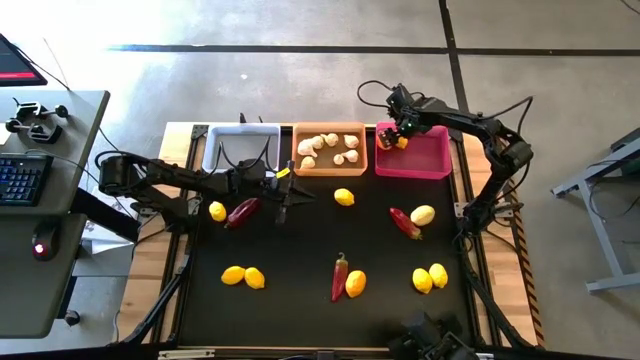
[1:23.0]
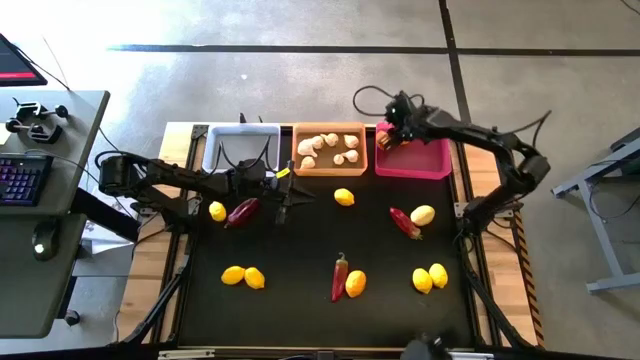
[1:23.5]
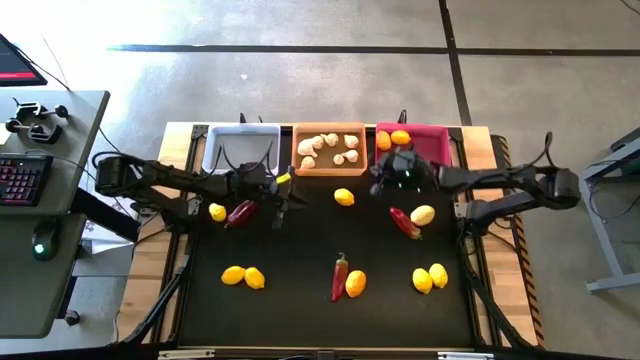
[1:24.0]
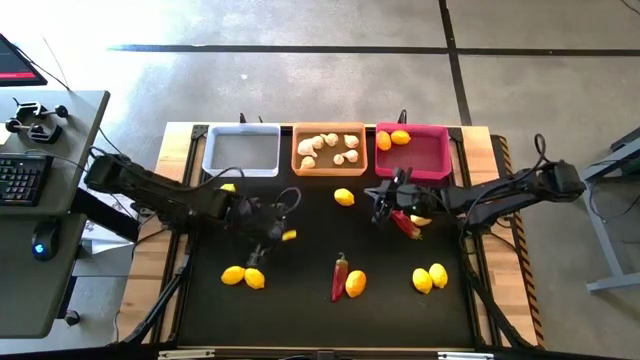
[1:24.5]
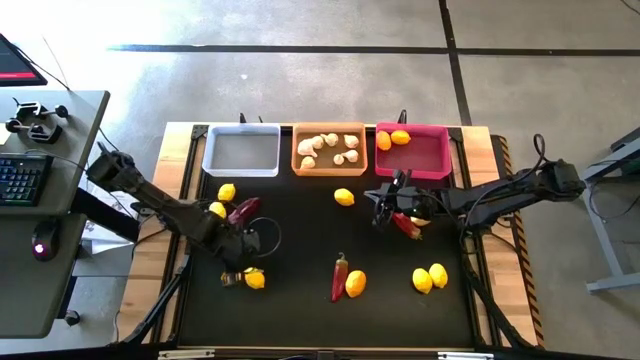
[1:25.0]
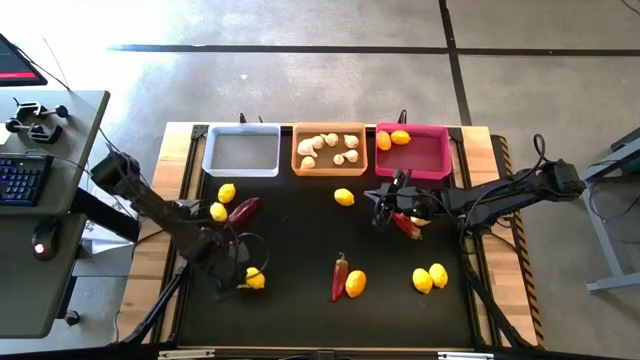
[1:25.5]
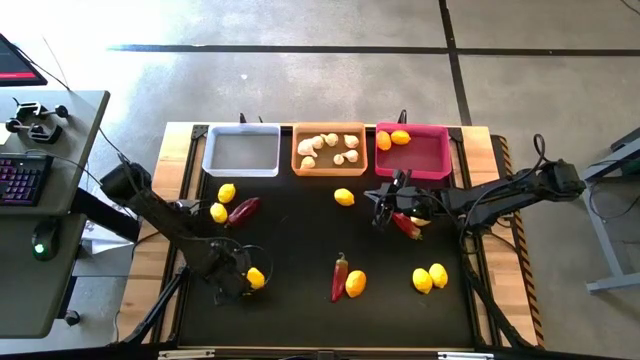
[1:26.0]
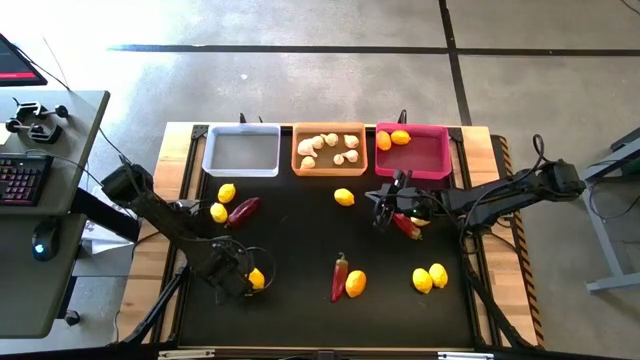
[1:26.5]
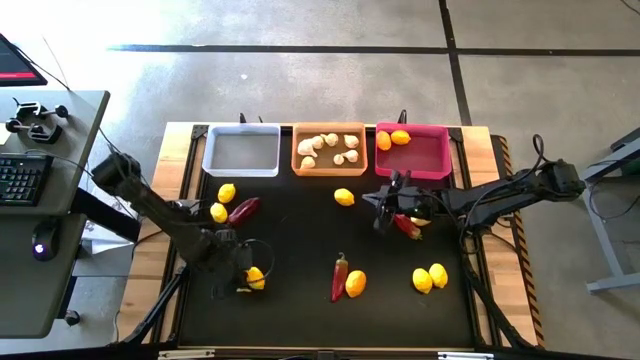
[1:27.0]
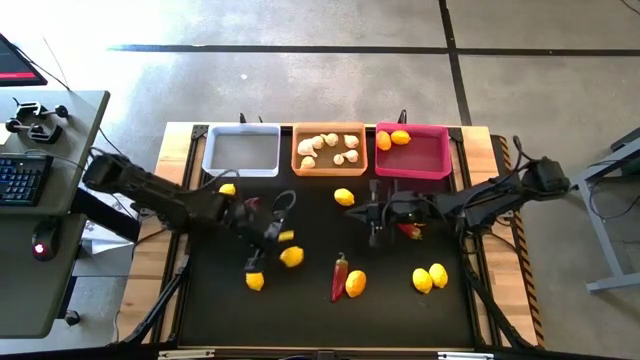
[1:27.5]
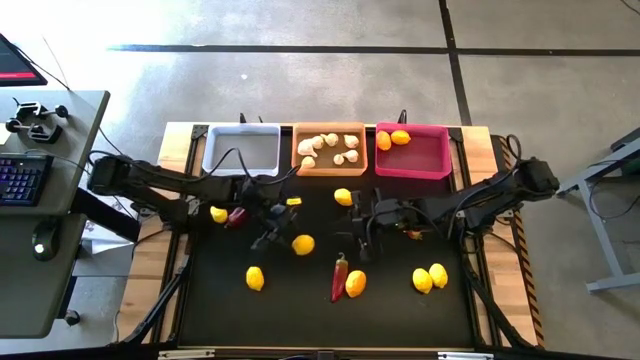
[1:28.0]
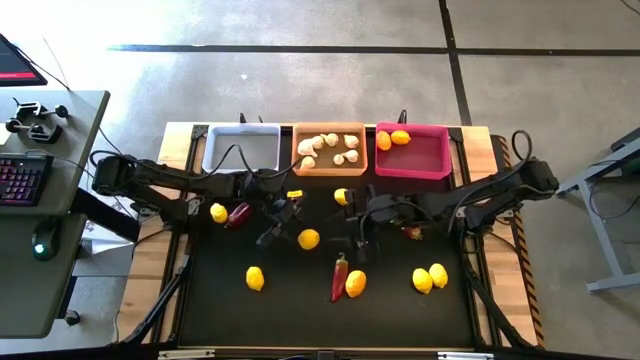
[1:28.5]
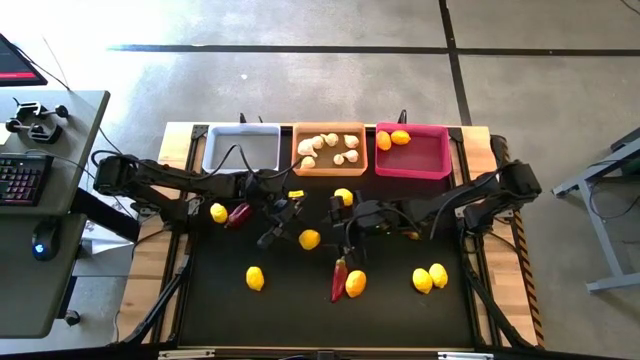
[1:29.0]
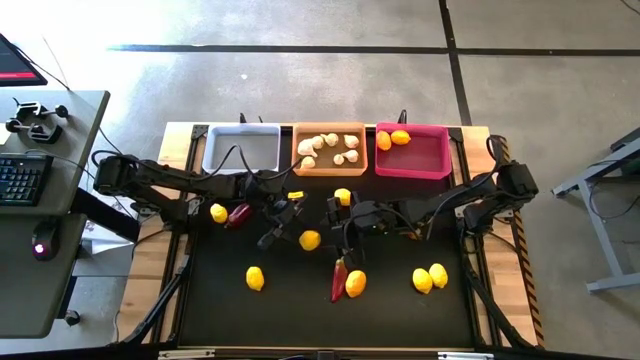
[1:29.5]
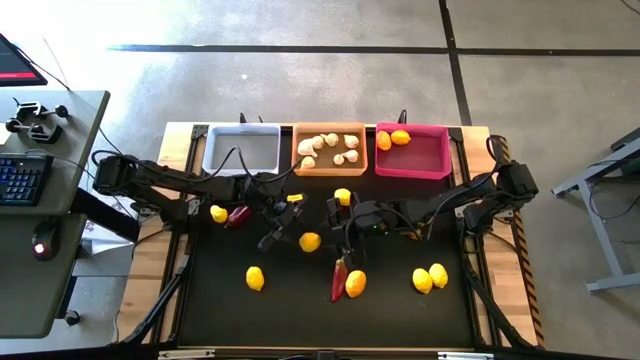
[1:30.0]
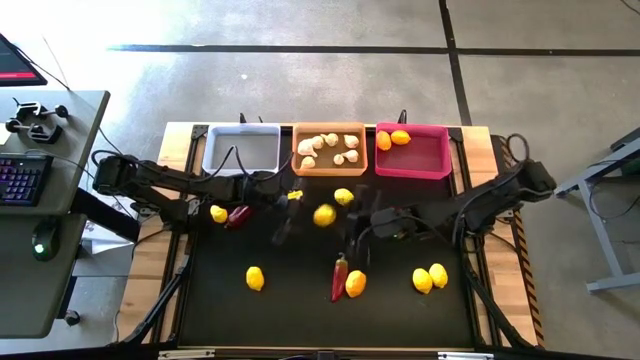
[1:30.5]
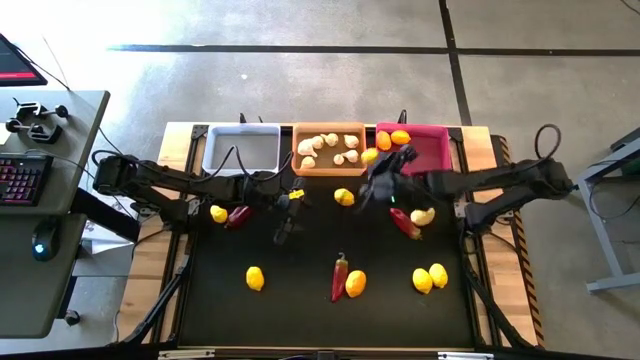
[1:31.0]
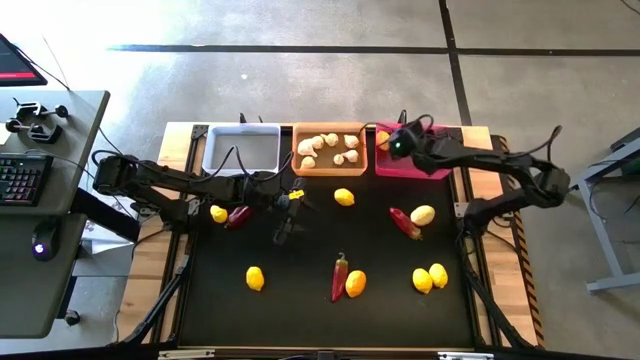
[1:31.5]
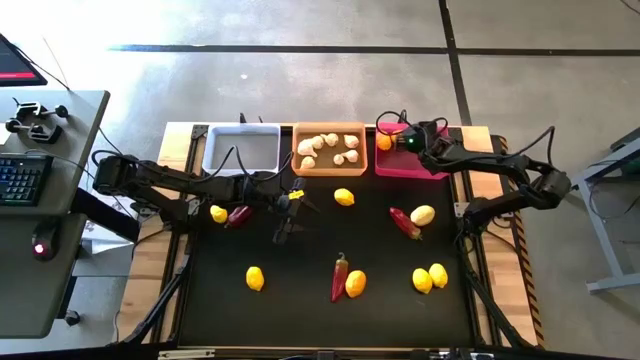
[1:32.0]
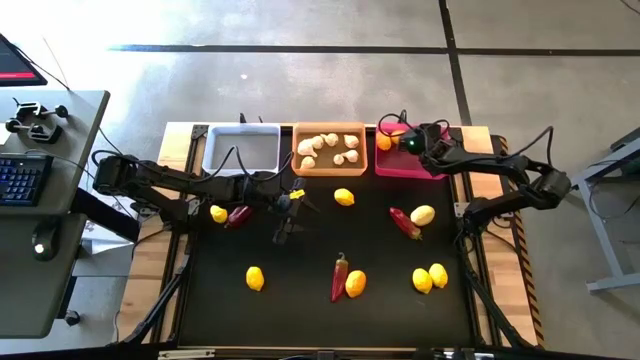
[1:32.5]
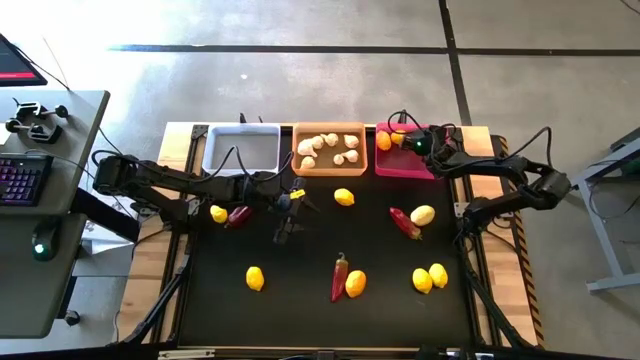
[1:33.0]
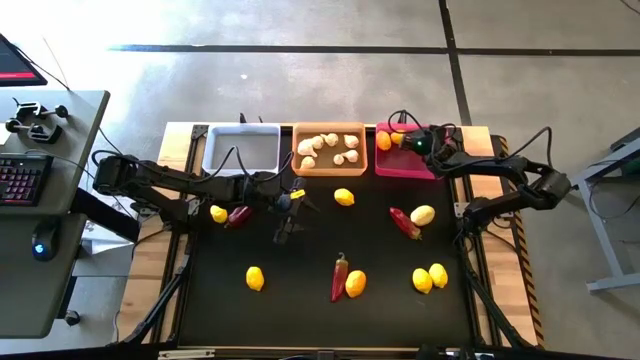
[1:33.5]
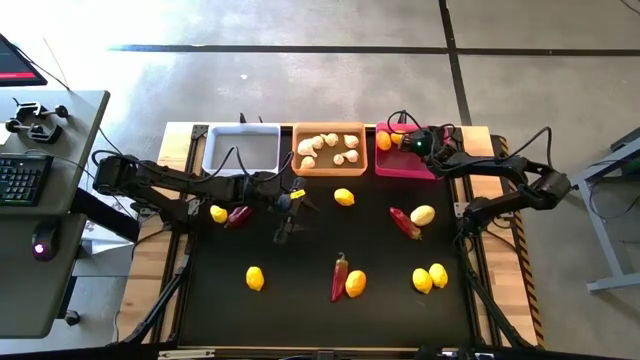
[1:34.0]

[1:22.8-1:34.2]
Task: Sort produce into baskets
Put the yellow lemon into the pink bin

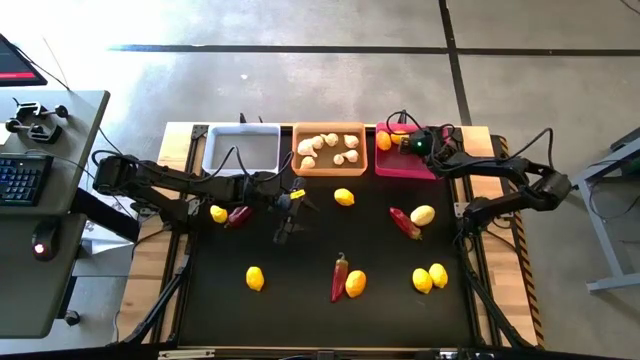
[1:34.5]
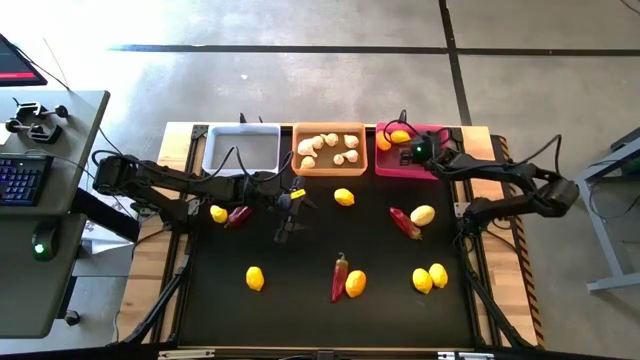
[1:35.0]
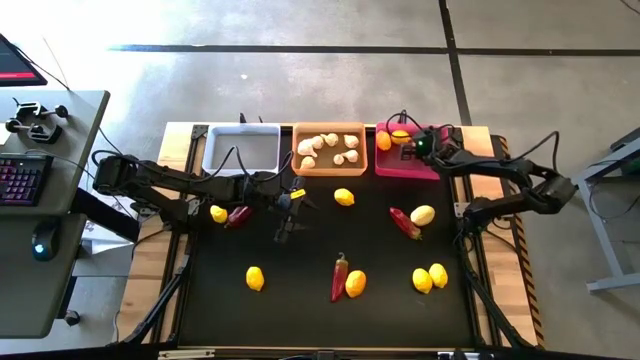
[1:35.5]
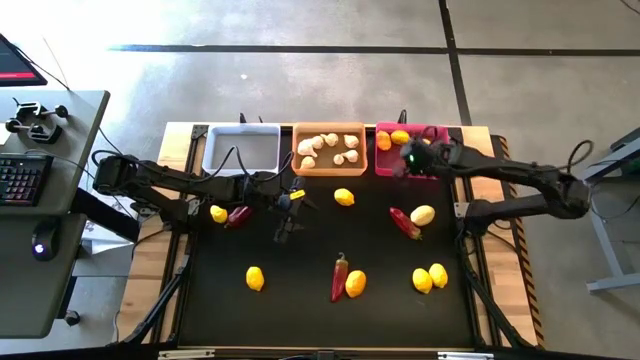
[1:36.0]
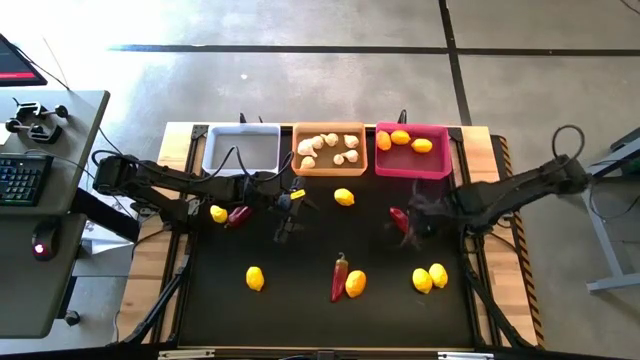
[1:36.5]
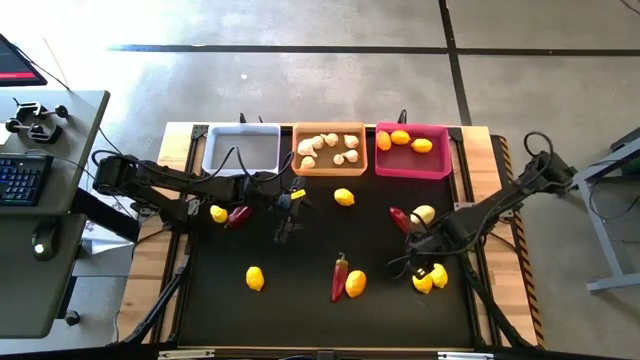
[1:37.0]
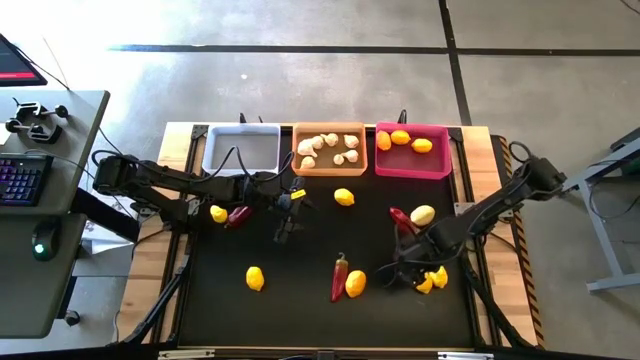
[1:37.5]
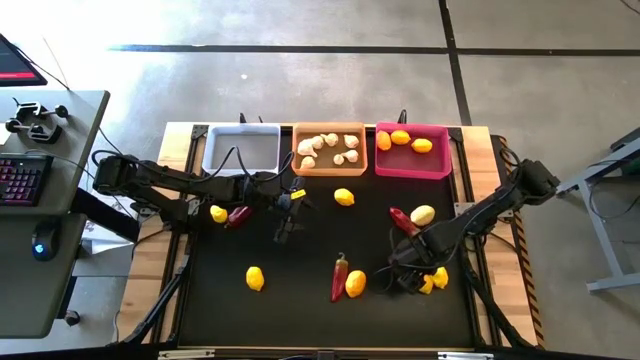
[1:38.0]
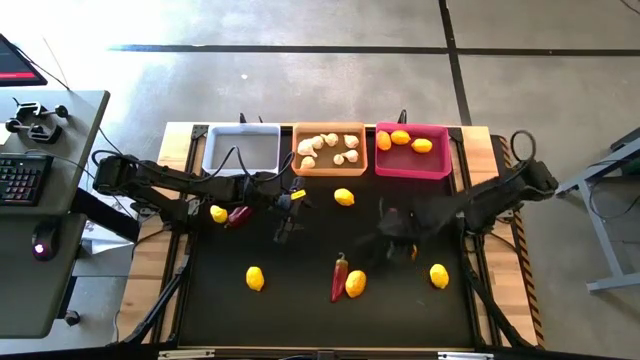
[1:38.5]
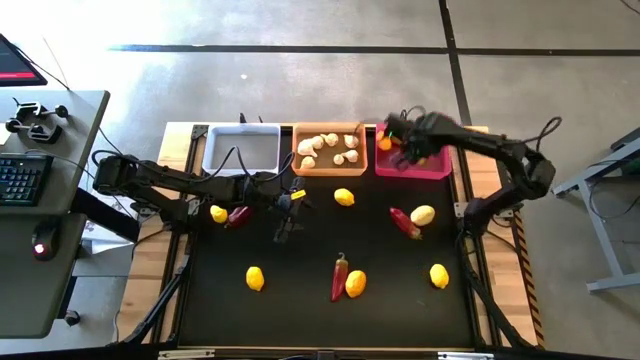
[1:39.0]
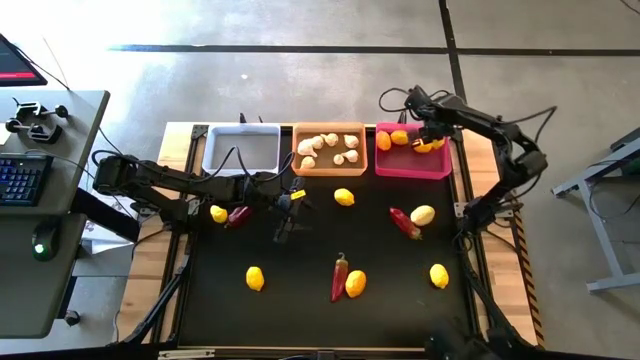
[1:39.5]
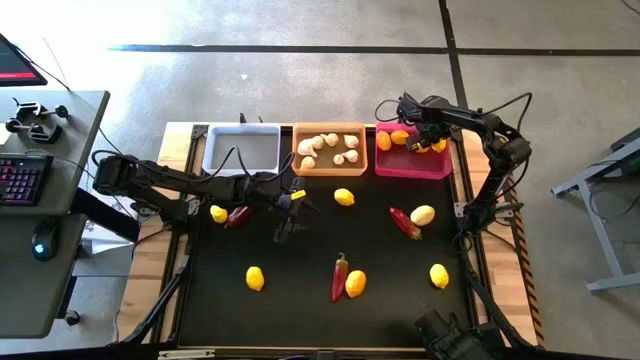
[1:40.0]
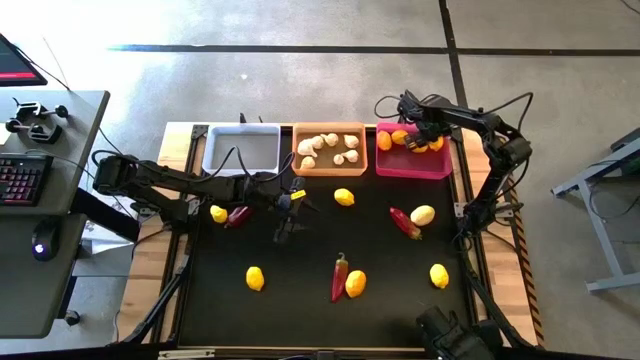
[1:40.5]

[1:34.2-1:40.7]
Put the yellow lemon into the pink bin

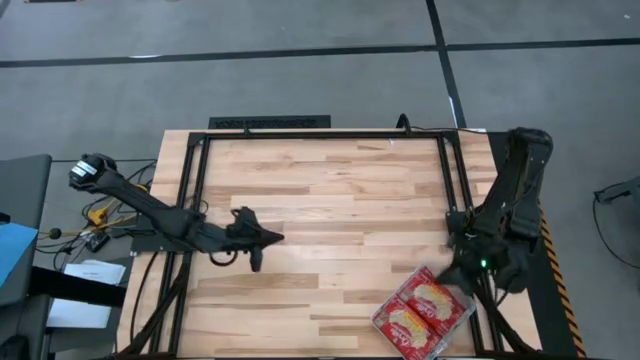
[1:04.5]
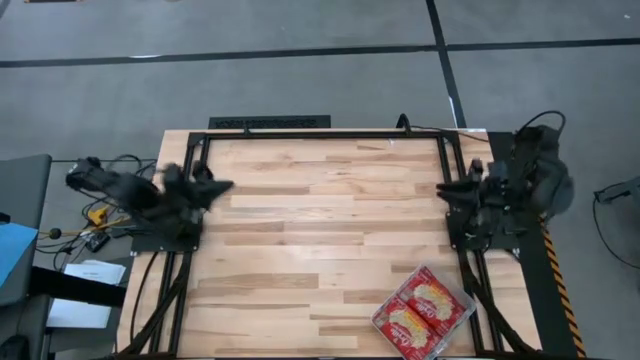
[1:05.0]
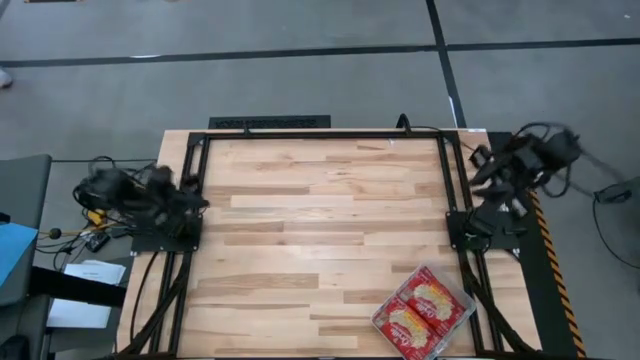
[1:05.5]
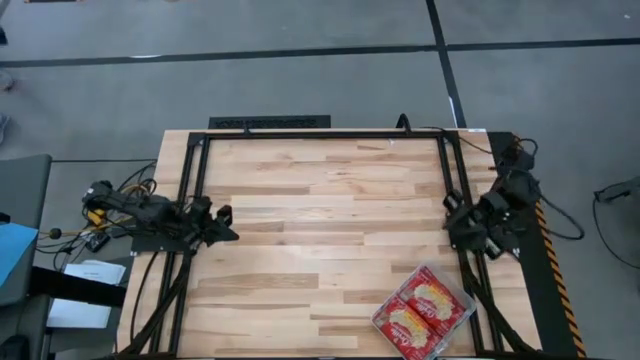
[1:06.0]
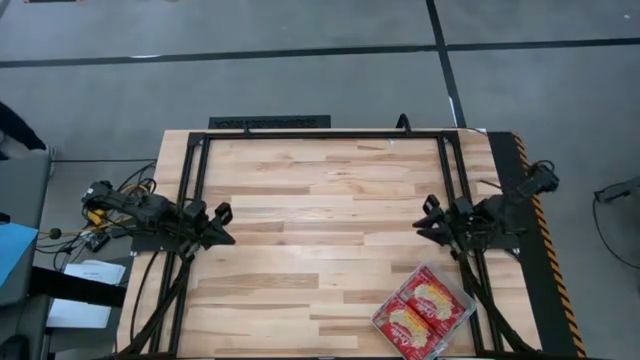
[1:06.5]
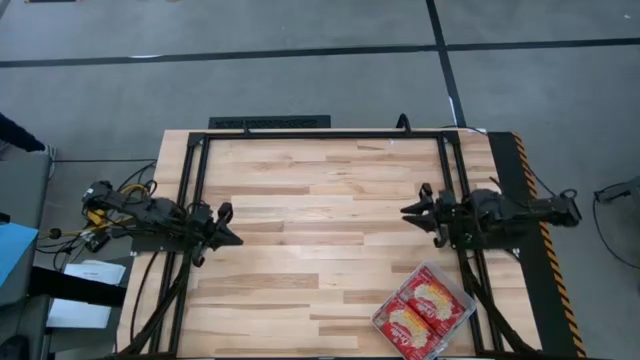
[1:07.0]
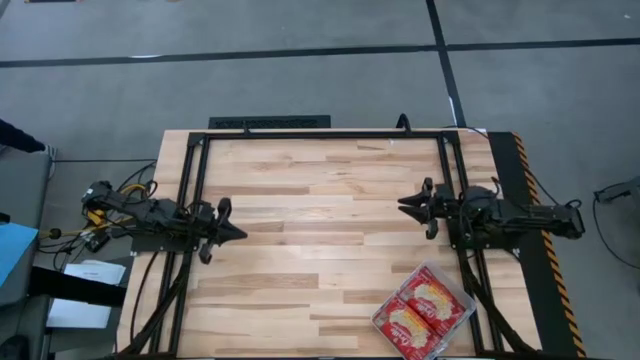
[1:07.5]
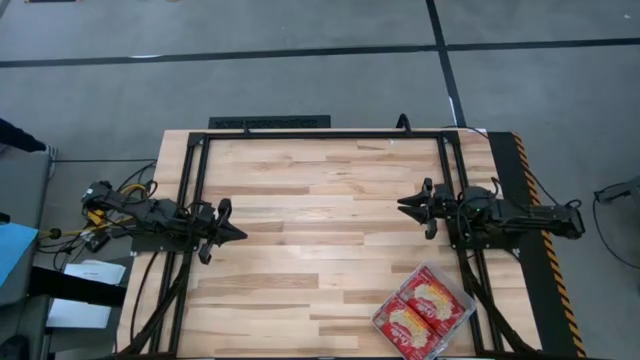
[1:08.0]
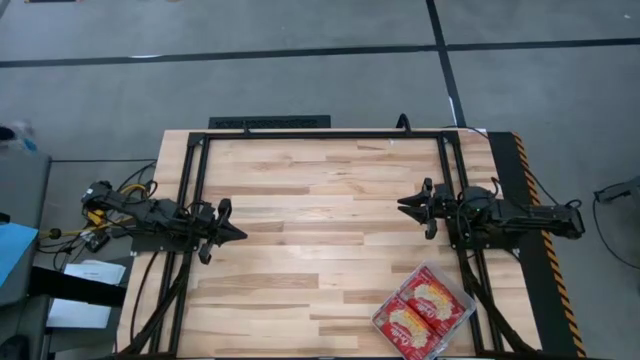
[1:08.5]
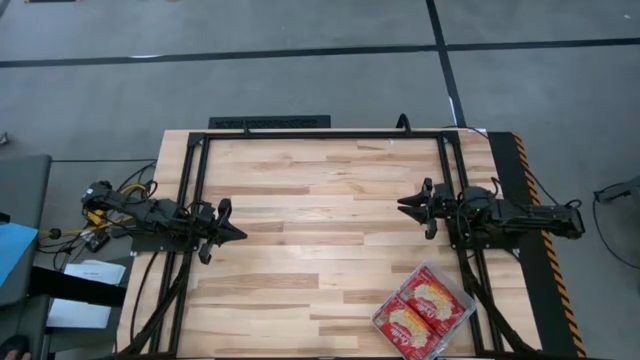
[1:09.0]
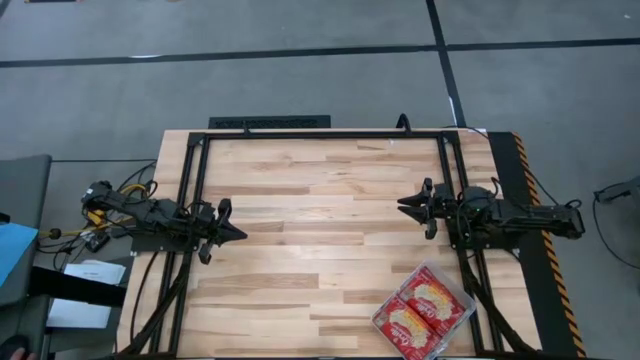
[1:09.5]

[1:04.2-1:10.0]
Task: Sort popcorn bags into baskets
Return to Home Position
